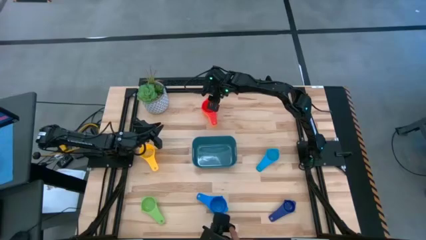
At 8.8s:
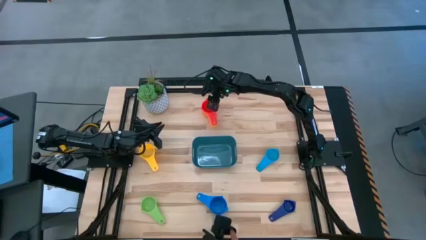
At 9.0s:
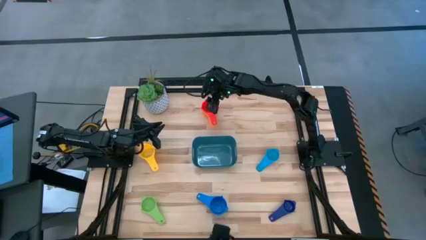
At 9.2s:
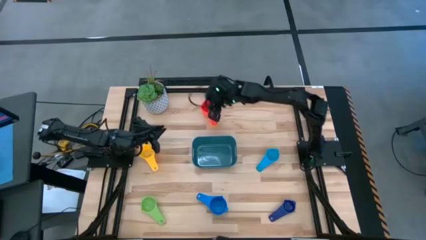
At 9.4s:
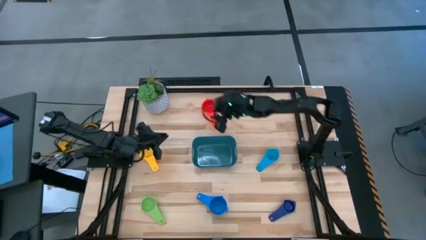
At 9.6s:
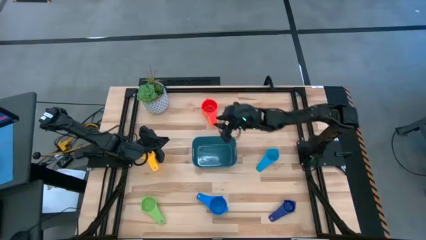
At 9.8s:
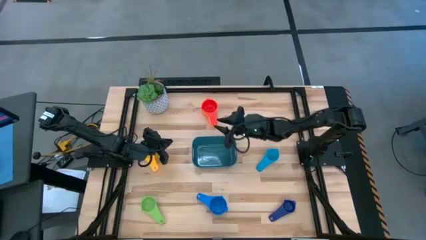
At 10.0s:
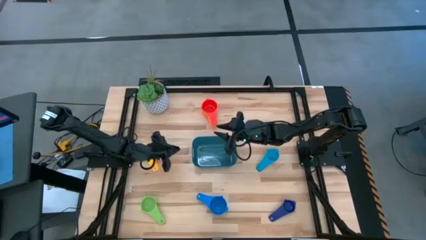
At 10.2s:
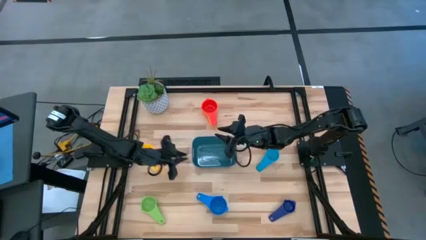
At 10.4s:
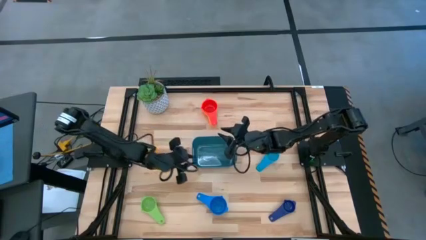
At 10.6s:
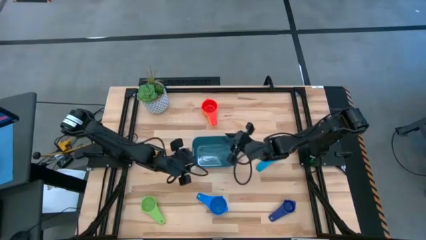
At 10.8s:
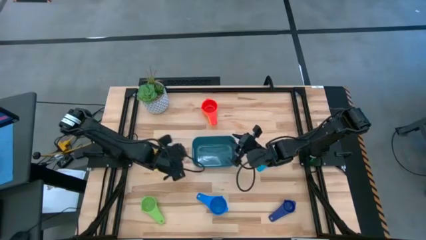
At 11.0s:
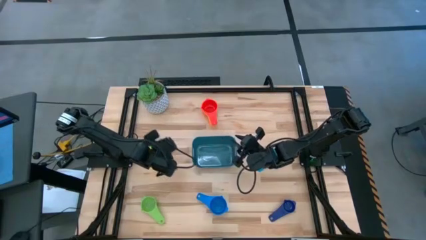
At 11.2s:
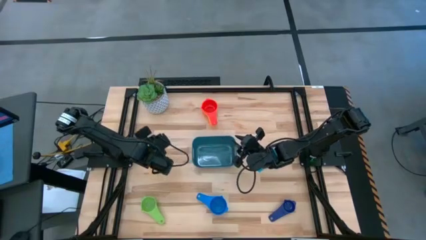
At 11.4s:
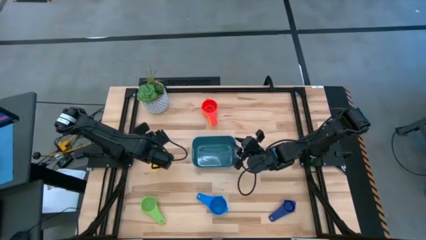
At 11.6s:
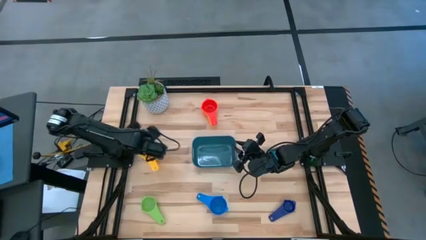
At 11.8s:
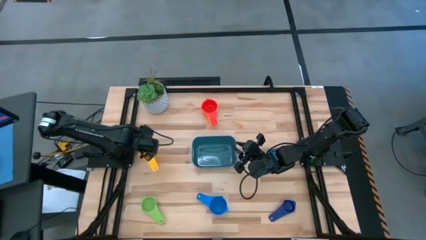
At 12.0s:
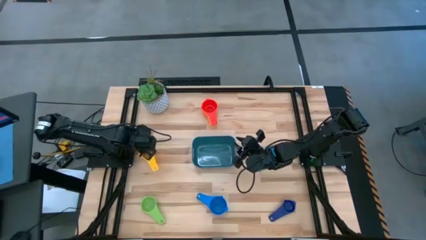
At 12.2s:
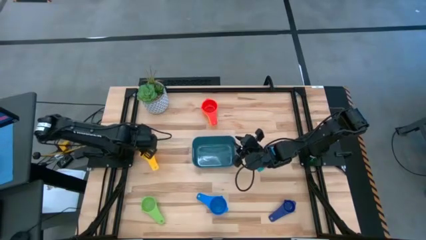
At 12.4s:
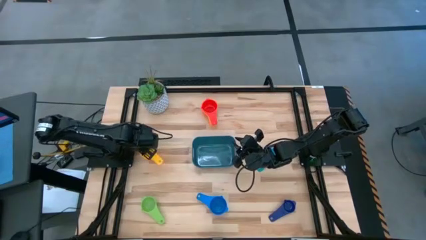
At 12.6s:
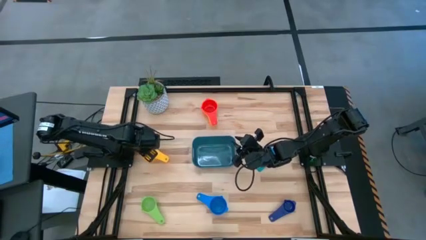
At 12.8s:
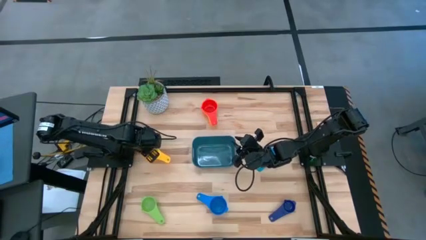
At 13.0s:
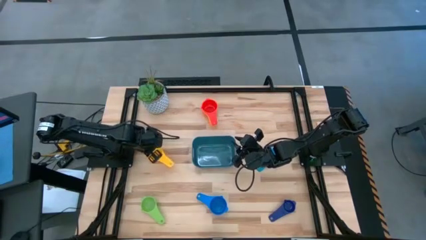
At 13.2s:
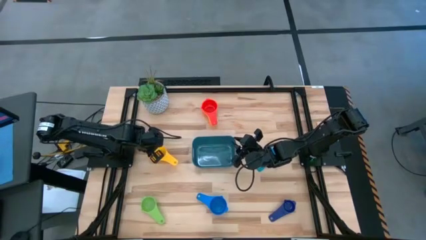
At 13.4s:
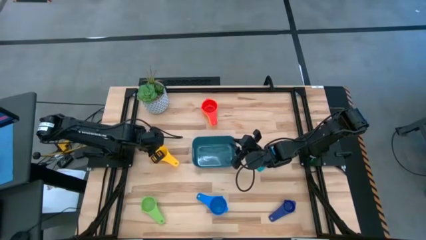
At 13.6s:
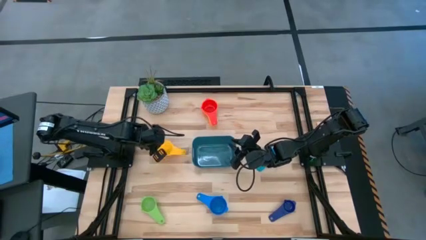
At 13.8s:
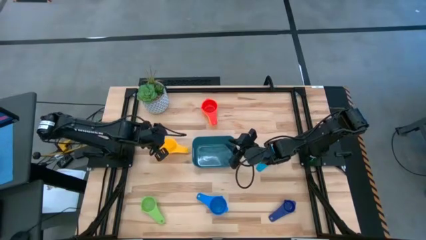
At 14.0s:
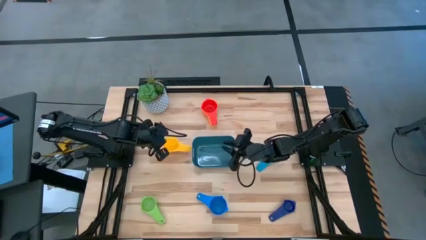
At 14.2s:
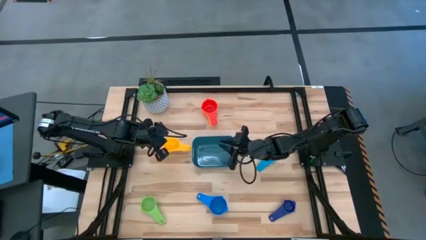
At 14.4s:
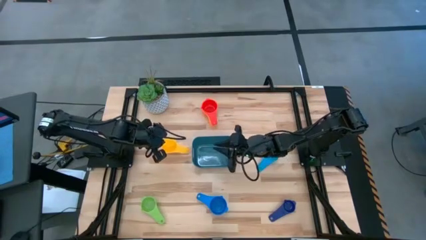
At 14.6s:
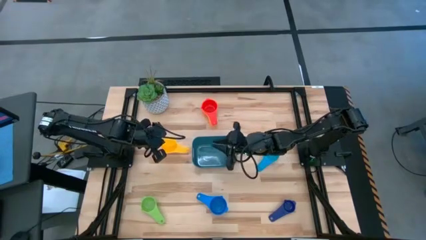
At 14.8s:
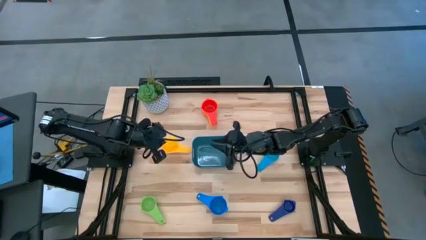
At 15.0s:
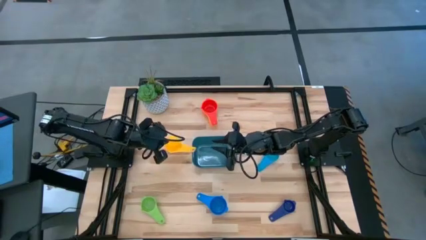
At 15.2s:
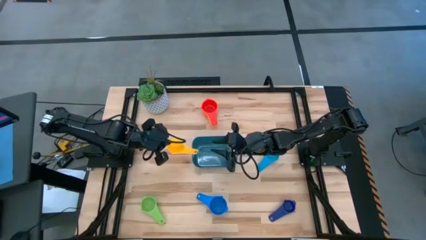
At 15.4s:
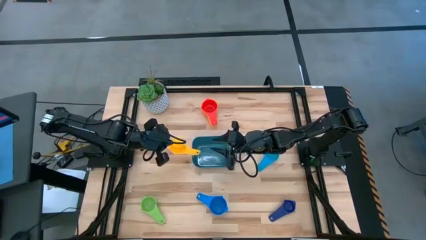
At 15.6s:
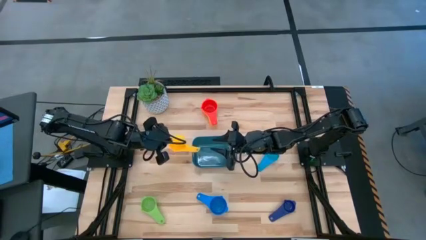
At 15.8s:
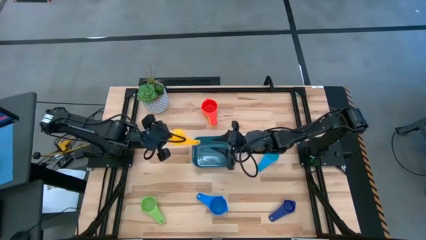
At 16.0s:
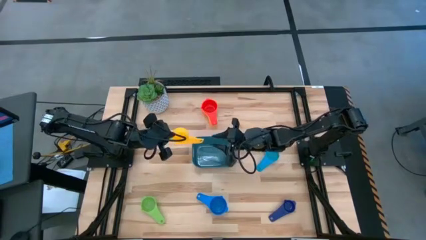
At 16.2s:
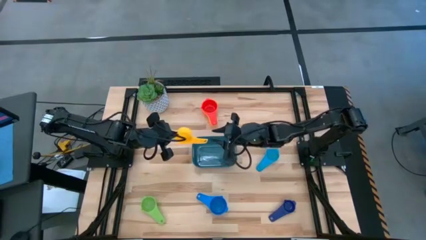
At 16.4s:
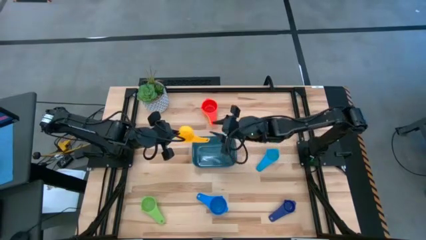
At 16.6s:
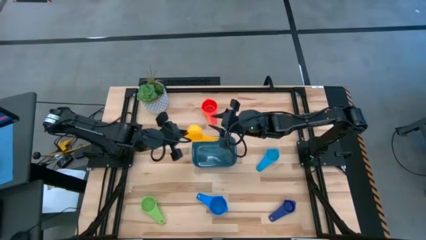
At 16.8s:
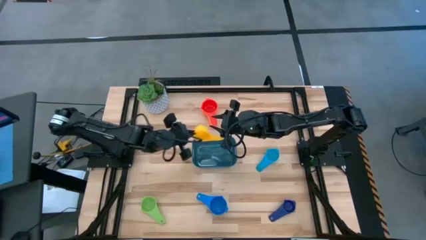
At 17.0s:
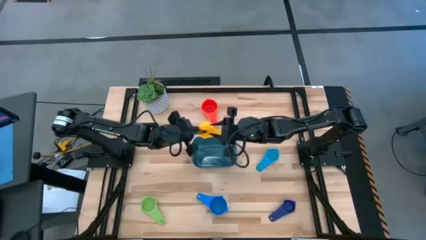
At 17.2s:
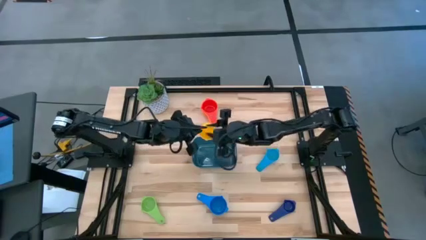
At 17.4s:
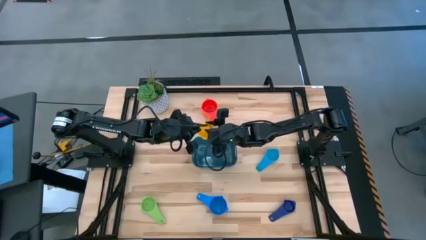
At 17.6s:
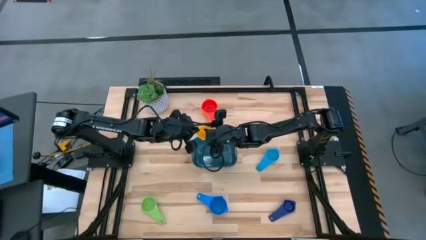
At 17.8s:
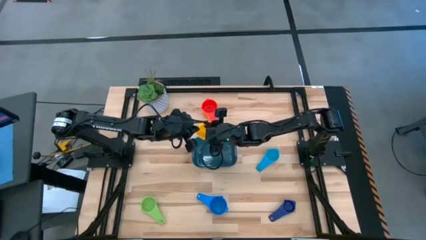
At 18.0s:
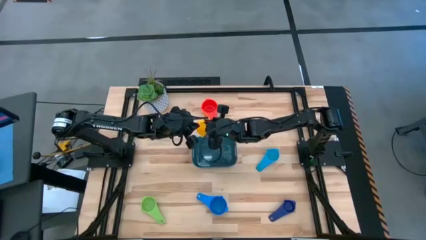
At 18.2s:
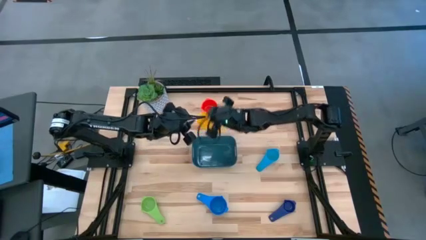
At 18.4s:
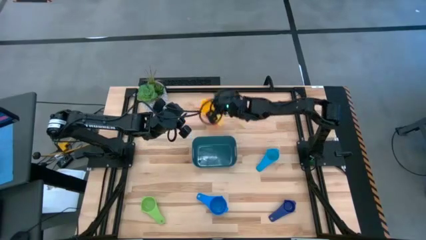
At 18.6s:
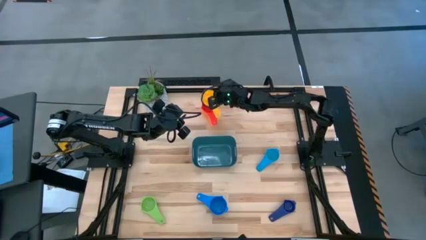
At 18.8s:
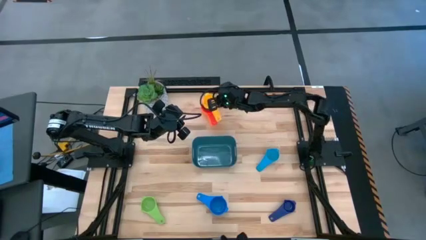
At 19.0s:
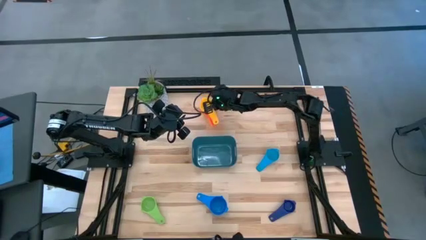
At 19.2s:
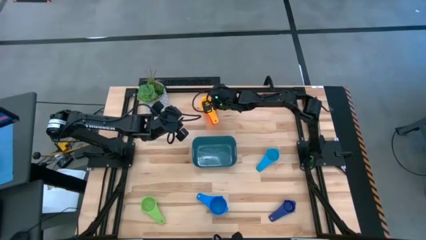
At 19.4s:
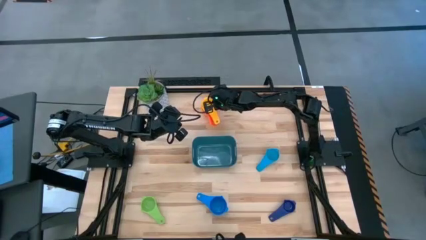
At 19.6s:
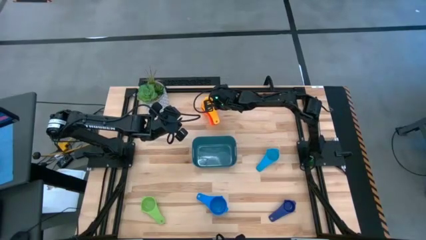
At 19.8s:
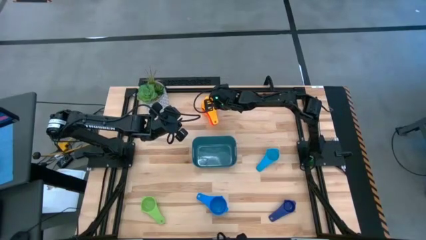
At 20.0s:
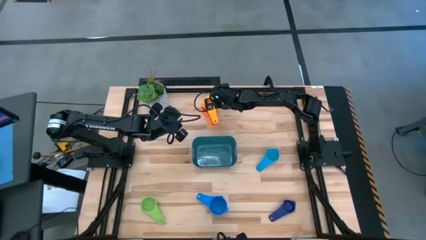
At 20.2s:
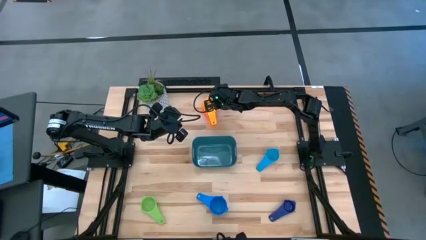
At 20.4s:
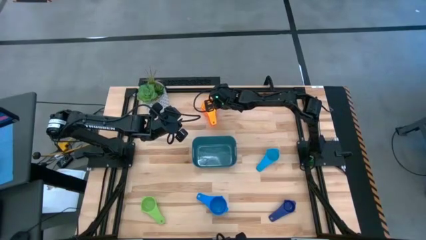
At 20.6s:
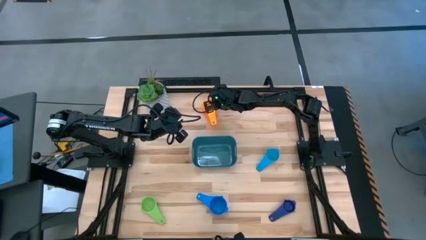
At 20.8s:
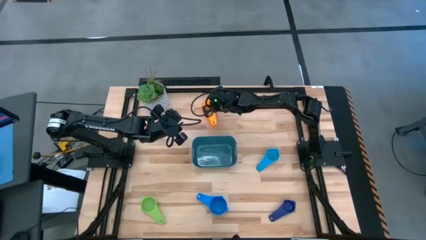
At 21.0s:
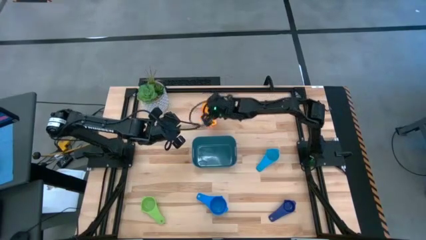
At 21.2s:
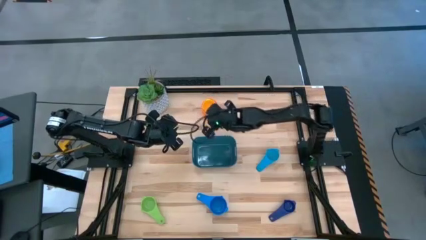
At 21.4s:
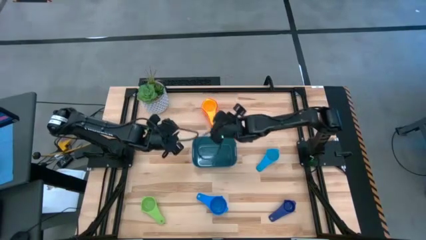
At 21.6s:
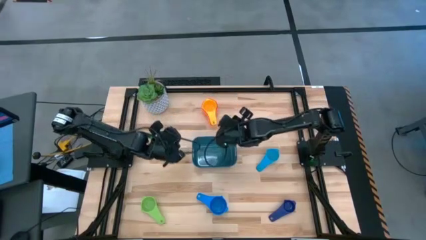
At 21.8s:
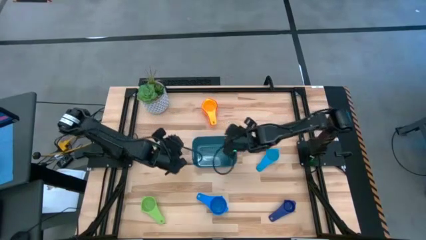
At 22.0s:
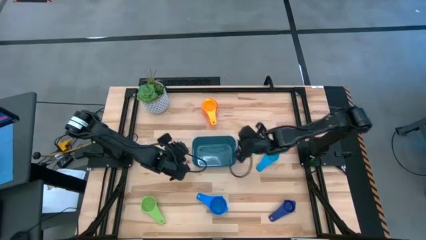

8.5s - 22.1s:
Task: Nest measuring cups in basket
Stack the blue measuring cup on top of the red measuring cup

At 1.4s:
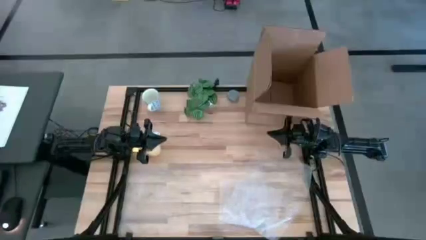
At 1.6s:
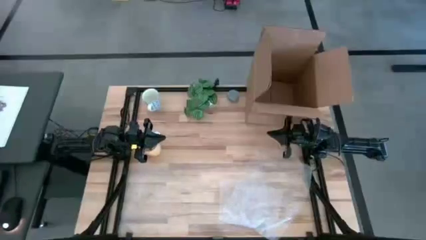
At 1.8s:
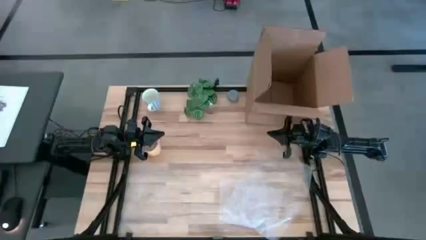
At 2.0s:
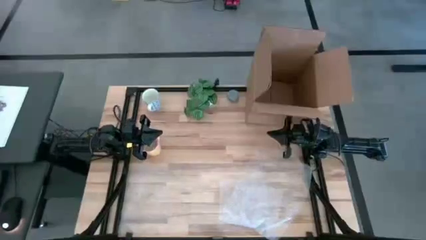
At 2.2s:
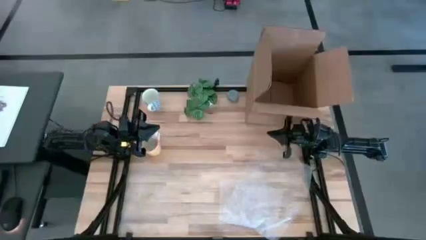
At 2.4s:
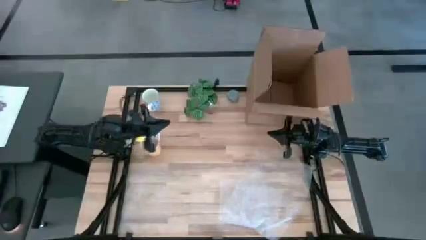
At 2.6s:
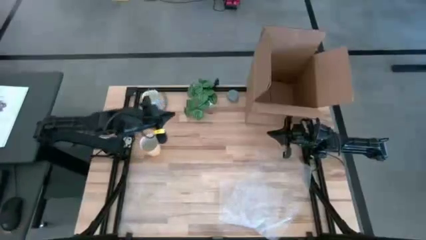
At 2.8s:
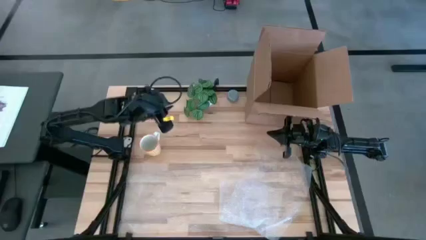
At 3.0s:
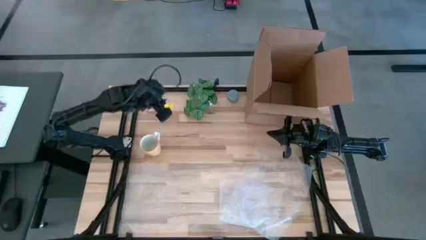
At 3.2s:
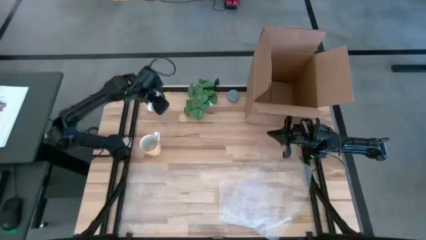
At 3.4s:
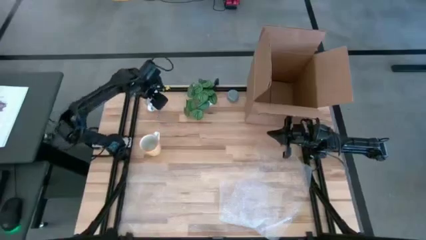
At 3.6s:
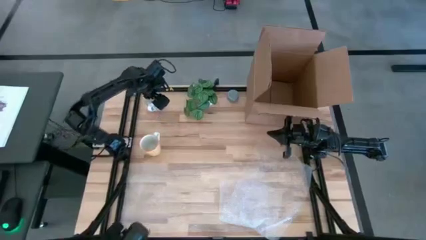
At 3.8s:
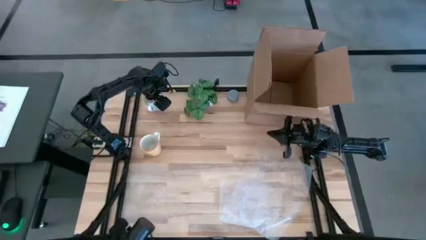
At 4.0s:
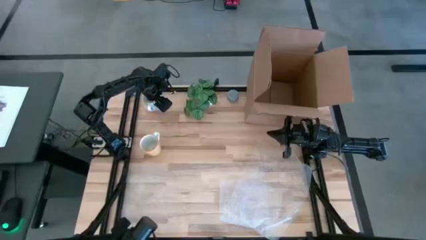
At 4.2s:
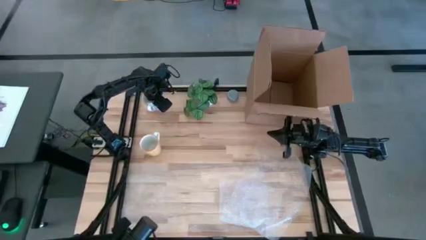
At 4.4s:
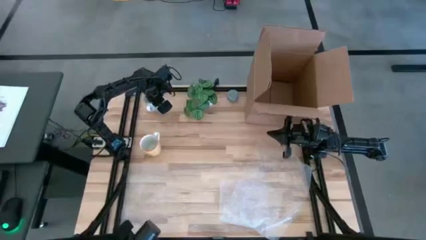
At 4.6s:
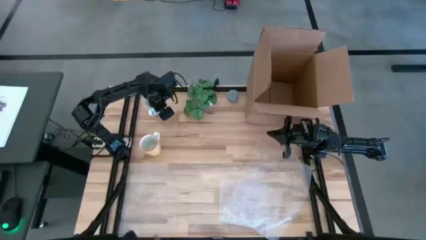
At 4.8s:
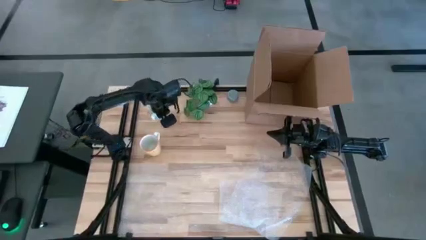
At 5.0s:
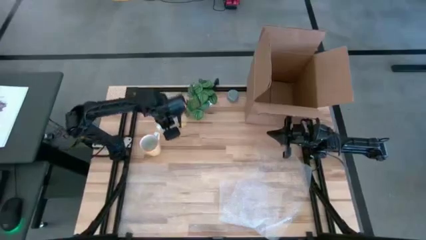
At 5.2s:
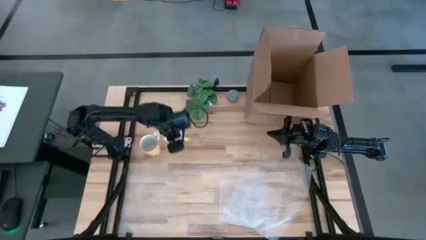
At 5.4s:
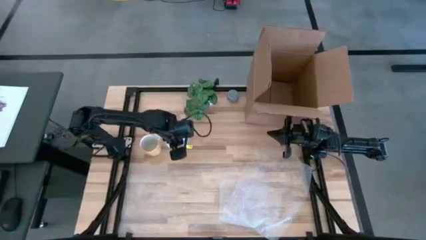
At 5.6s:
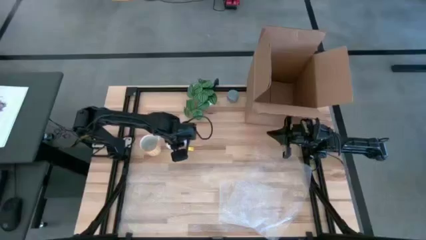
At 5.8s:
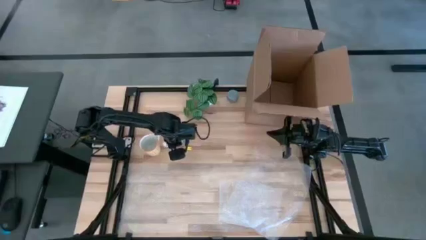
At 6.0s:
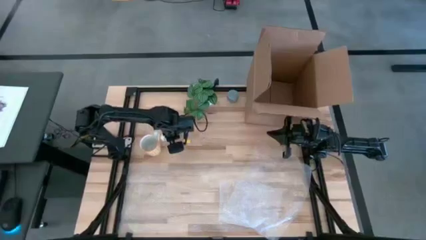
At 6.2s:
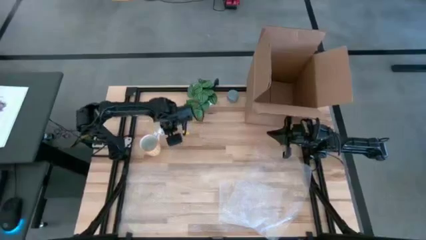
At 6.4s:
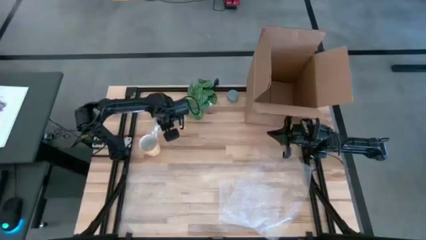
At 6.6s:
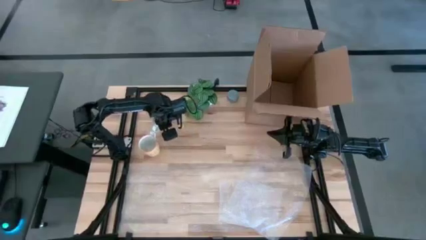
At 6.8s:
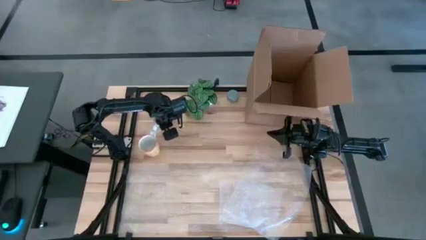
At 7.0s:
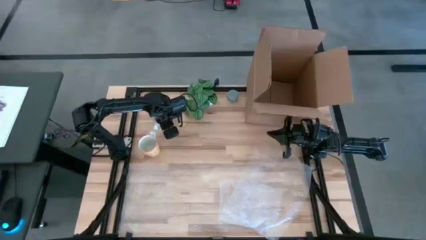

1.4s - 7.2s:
Task: wrap mug
Put the blue cup beside the orange cup
